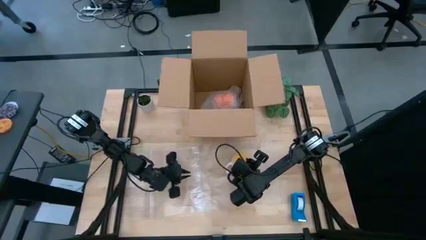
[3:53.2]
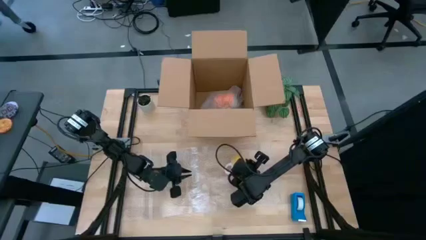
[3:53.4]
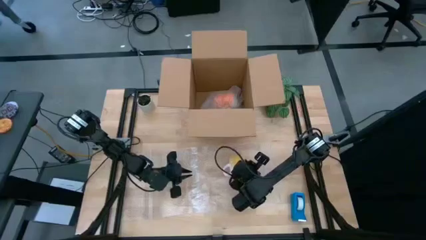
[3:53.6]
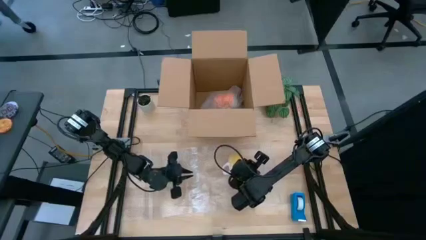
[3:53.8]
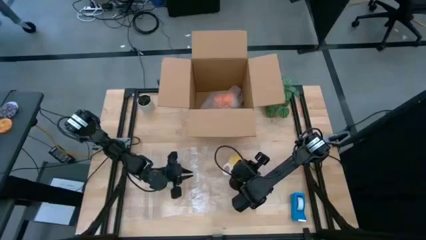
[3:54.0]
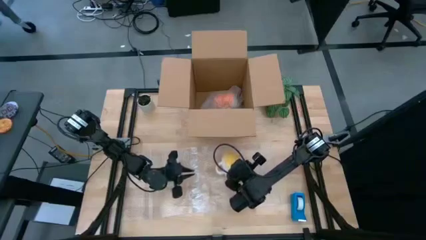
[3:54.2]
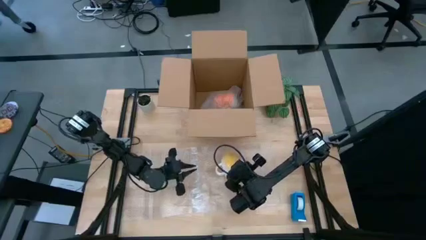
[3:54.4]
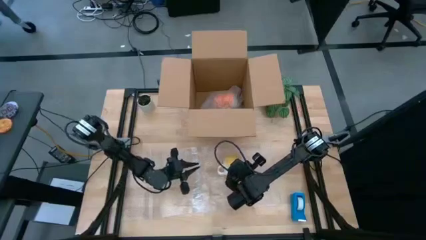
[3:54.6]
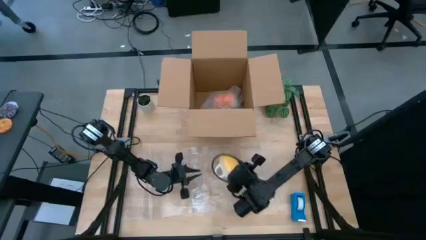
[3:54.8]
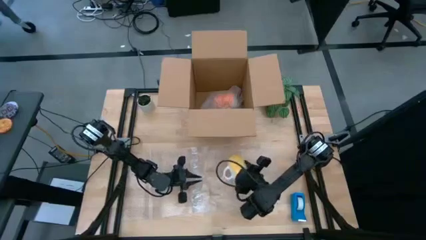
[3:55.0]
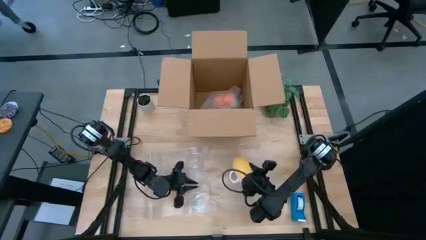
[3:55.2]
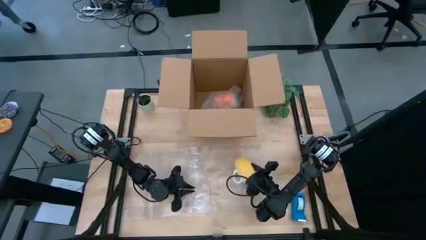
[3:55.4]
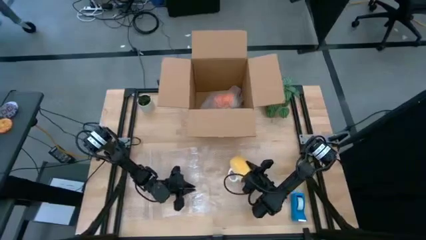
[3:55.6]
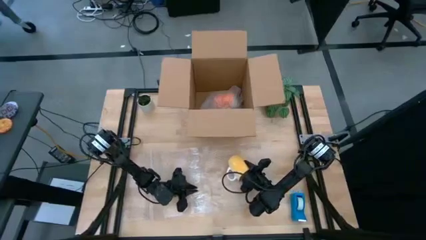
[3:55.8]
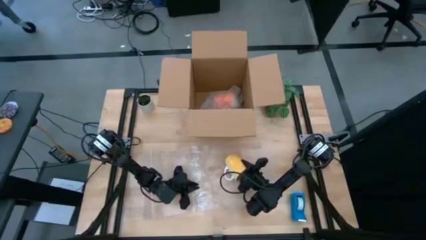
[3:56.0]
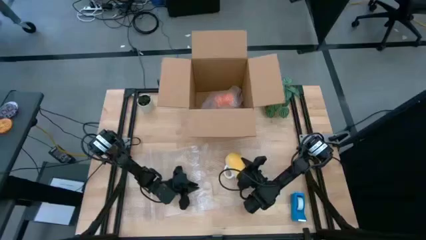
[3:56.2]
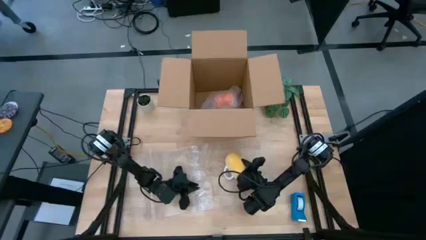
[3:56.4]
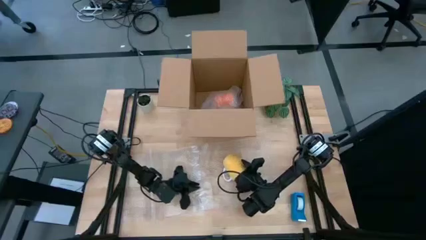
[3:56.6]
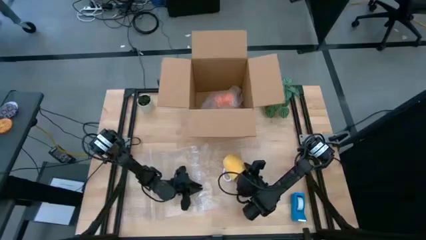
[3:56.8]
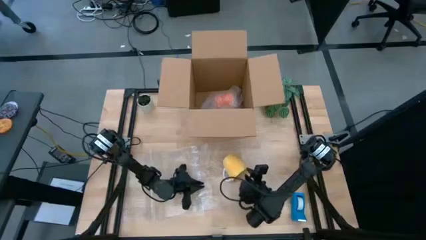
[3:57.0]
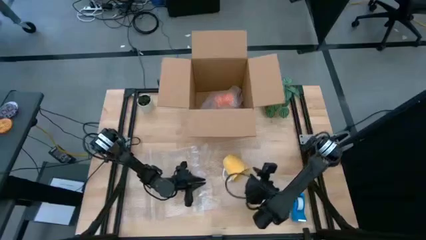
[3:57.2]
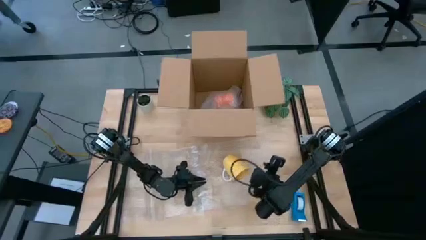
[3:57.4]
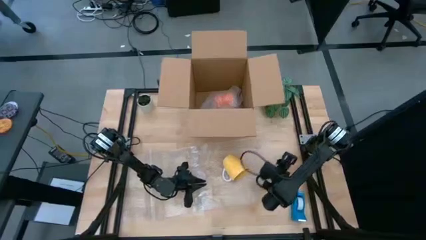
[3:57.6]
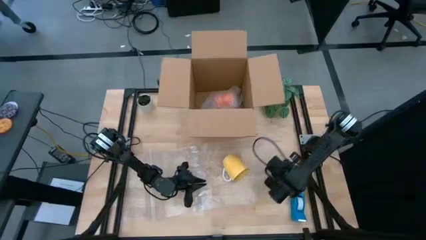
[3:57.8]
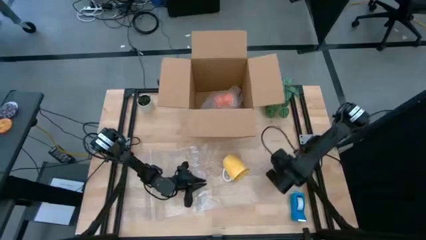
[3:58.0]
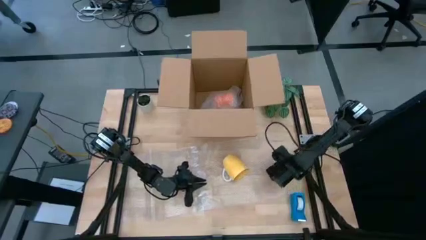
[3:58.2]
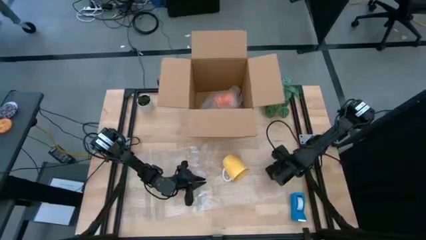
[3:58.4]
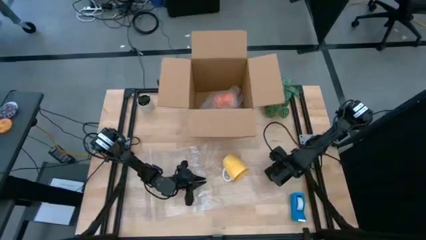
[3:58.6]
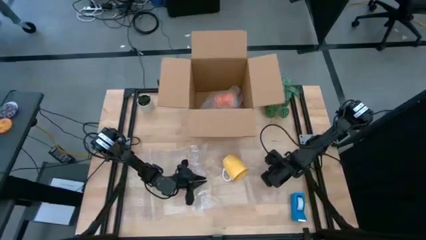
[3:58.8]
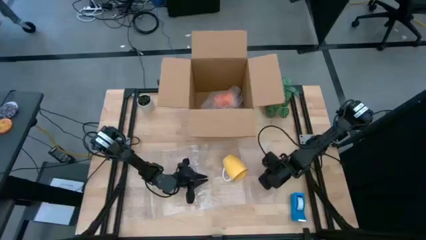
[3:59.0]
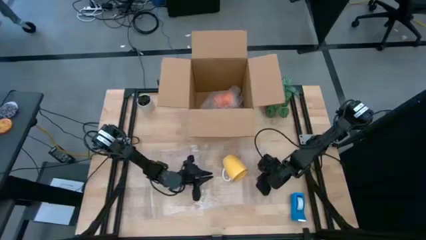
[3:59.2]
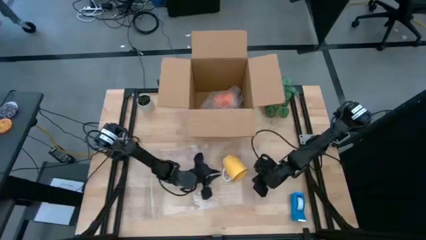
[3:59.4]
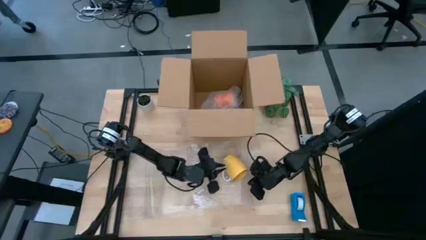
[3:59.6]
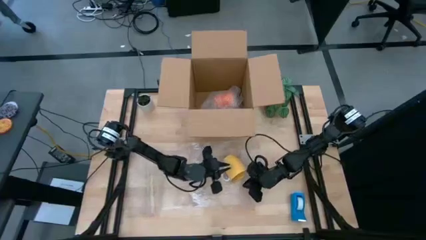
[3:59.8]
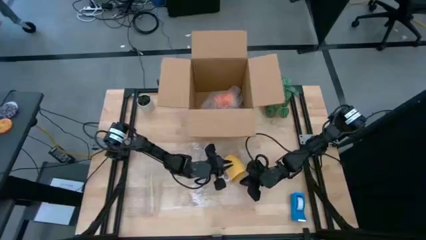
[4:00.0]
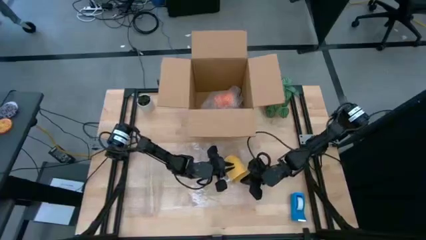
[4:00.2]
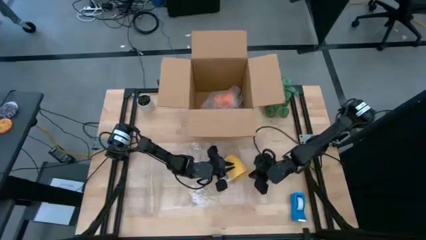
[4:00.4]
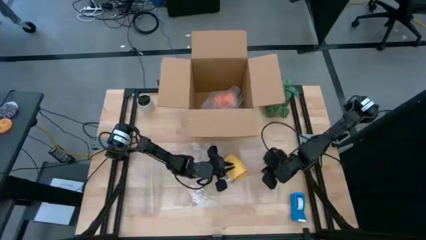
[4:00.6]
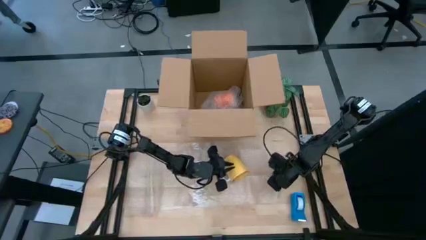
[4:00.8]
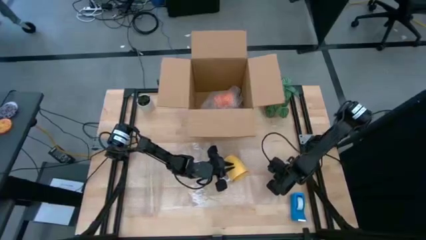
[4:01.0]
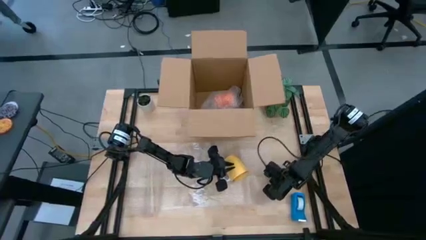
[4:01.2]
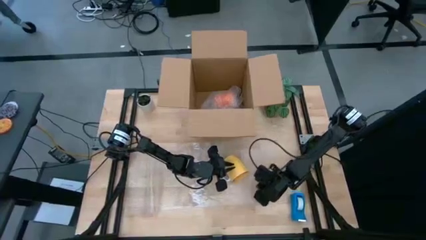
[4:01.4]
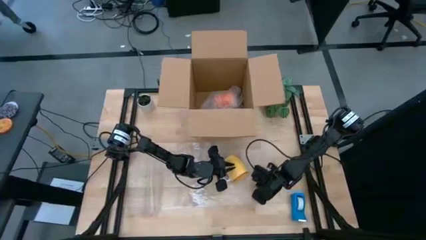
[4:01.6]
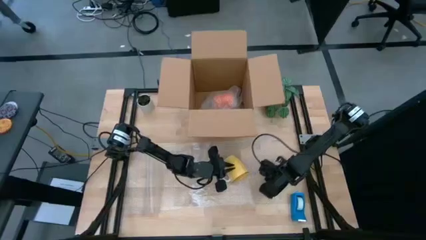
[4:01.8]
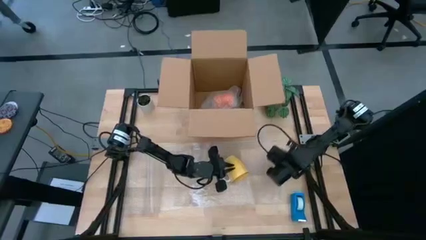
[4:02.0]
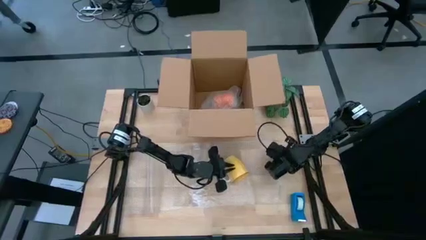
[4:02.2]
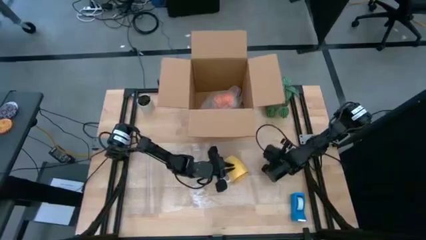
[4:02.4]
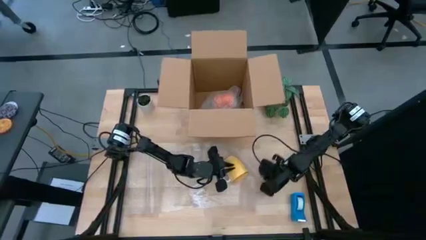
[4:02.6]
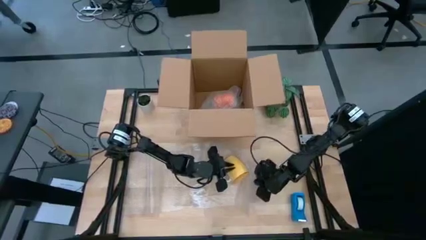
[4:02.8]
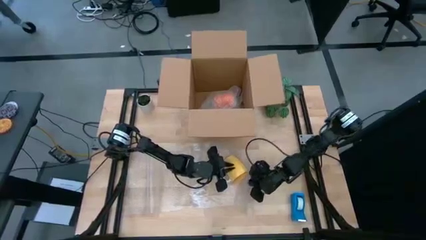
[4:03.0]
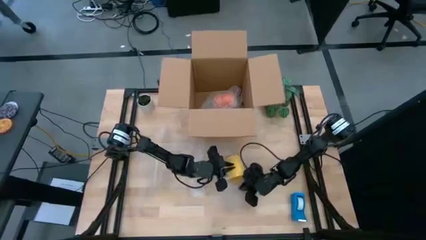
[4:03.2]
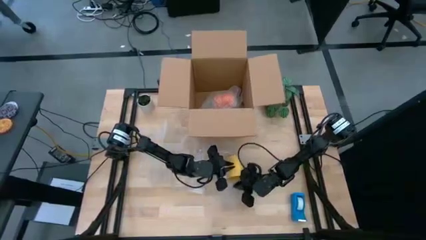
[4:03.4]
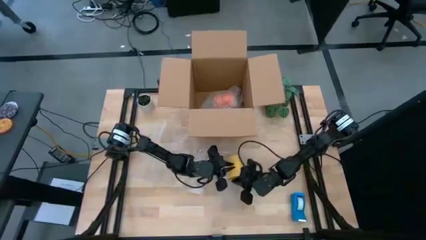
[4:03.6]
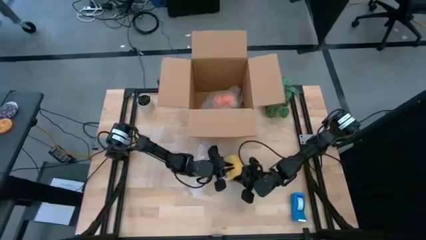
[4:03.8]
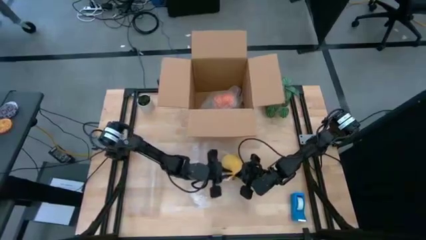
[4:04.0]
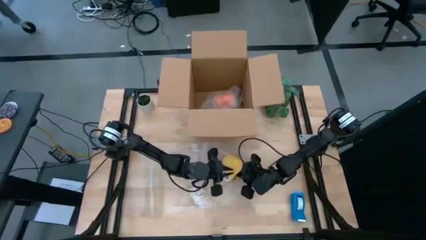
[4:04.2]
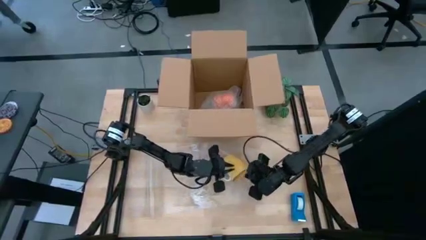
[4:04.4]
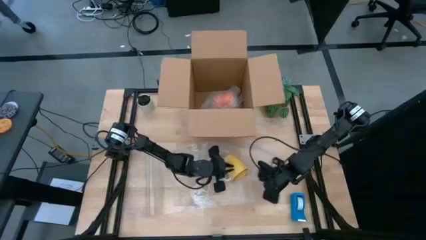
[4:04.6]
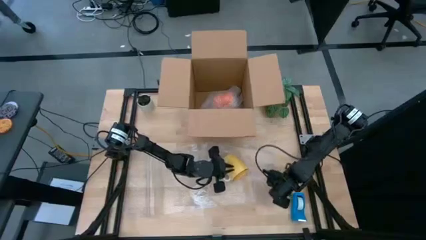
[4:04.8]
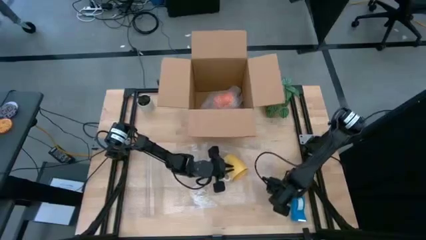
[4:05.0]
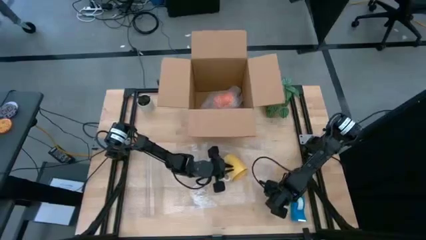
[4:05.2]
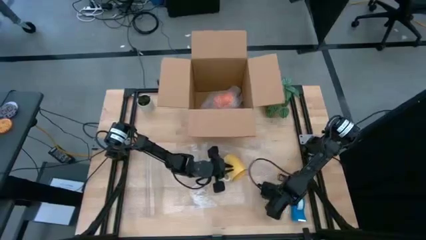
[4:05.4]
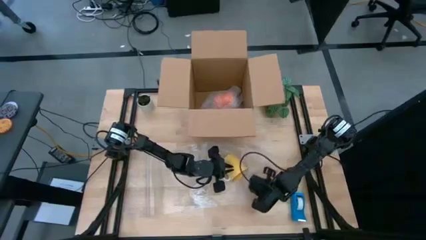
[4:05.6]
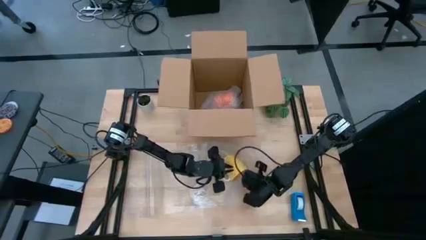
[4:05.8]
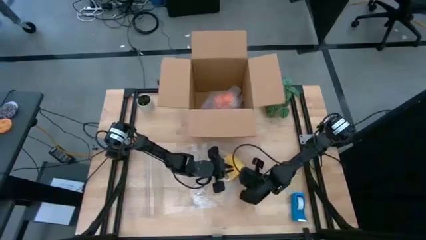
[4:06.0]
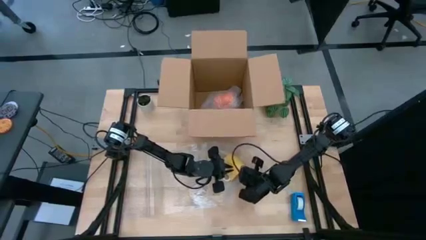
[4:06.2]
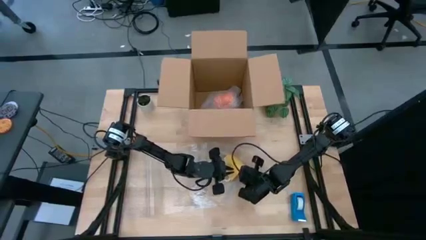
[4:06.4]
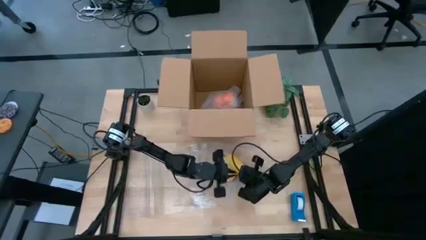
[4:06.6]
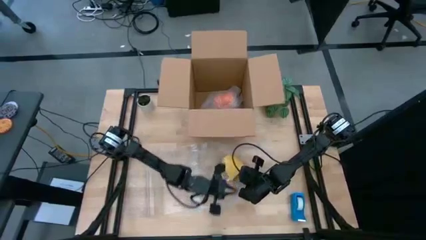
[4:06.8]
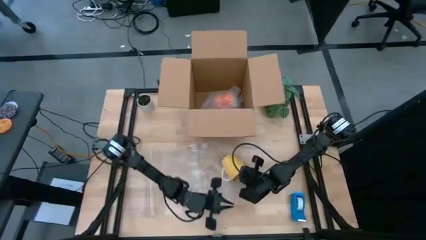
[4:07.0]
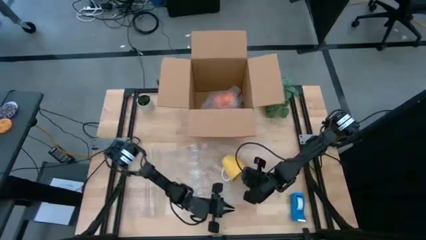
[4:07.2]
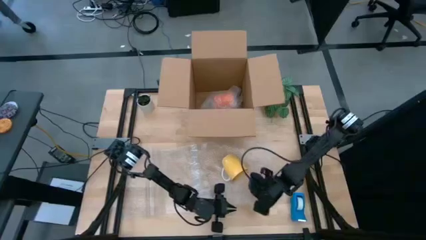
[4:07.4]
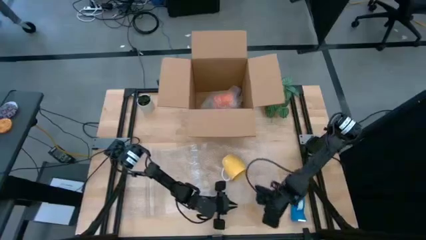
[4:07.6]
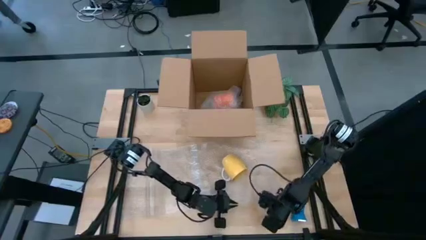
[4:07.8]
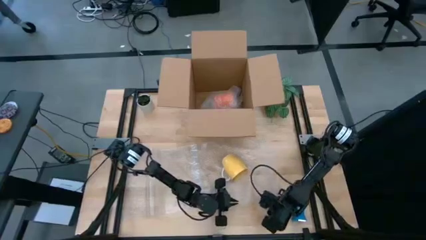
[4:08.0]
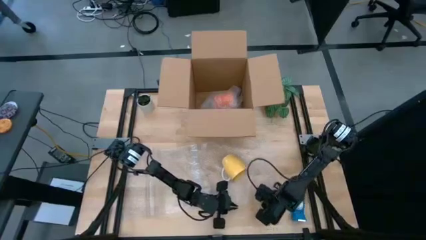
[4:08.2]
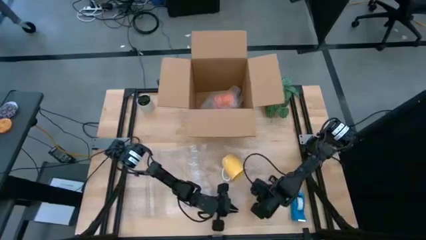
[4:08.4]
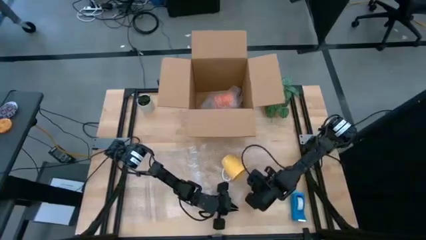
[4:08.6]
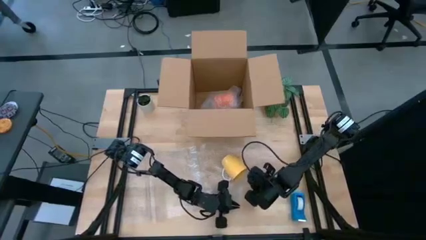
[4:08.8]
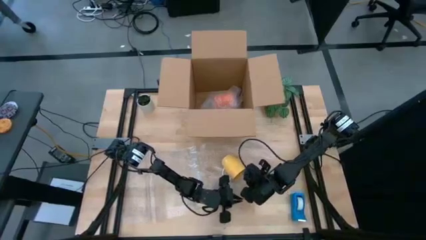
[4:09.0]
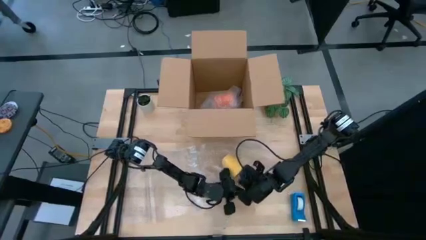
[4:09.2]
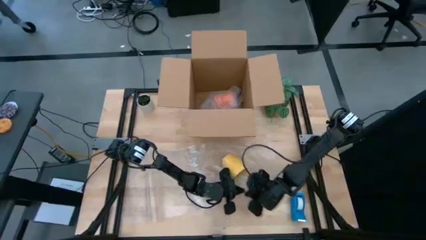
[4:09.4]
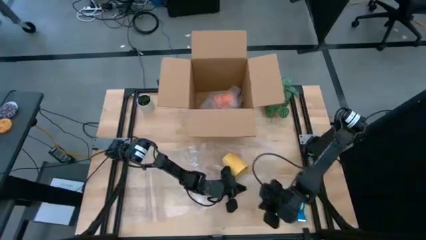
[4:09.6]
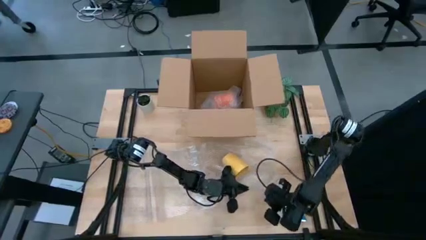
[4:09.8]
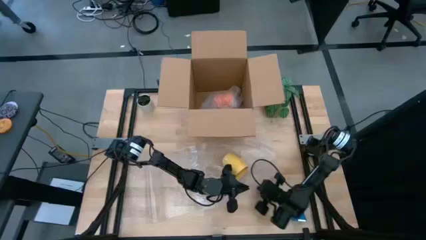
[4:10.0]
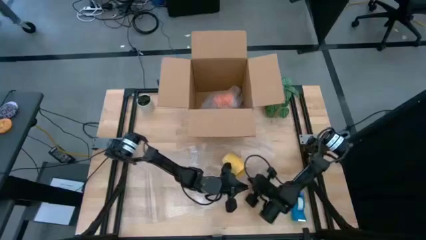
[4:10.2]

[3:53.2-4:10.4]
Task: wrap mug
Wrap the yellow mug with the bubble wrap
